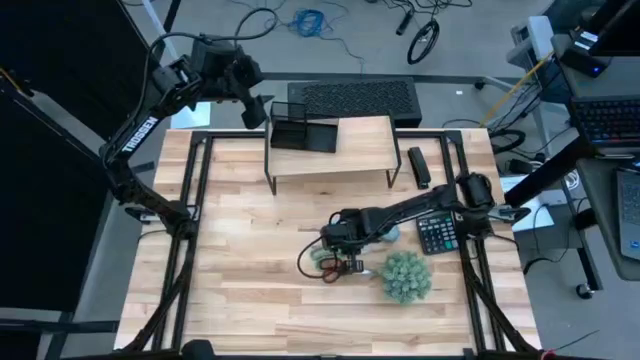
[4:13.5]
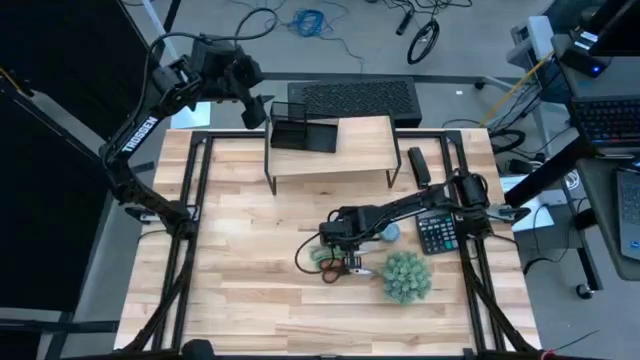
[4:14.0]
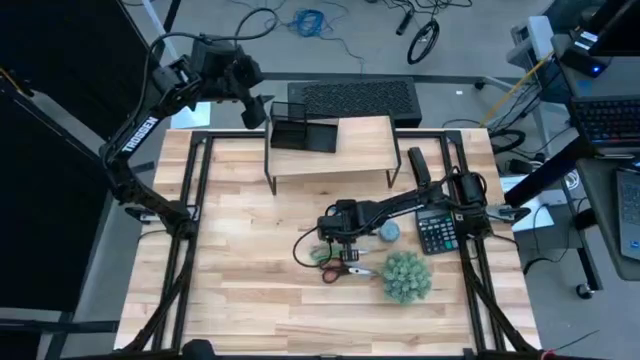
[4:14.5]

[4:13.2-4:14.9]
Task: Pick and place office supplies into organizer
Adjust the pens on the table

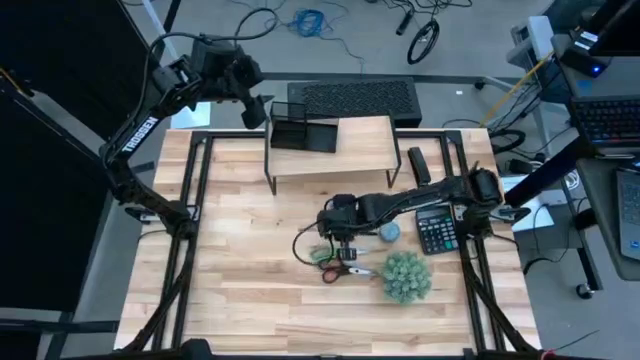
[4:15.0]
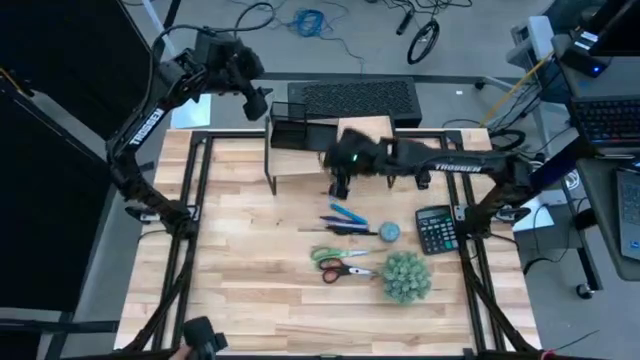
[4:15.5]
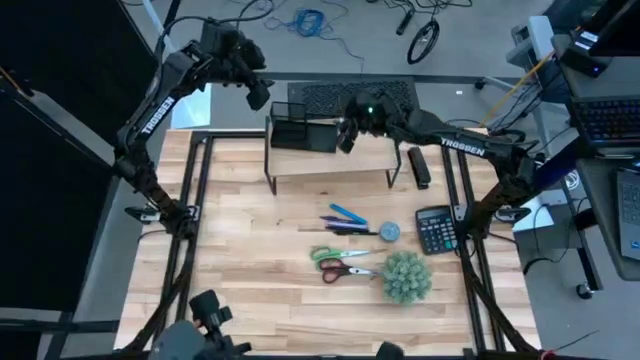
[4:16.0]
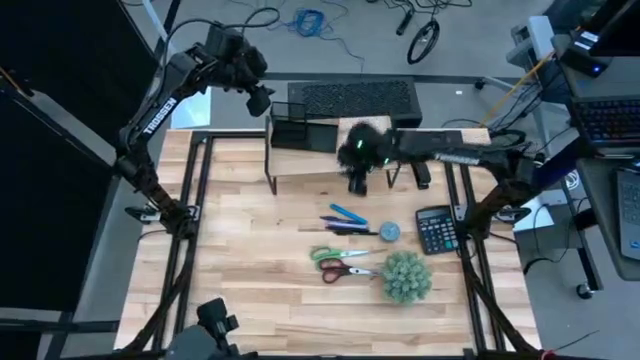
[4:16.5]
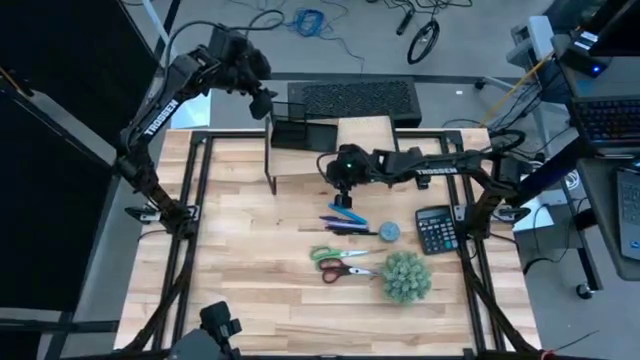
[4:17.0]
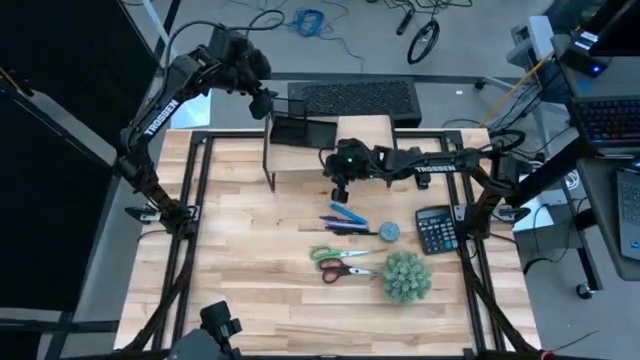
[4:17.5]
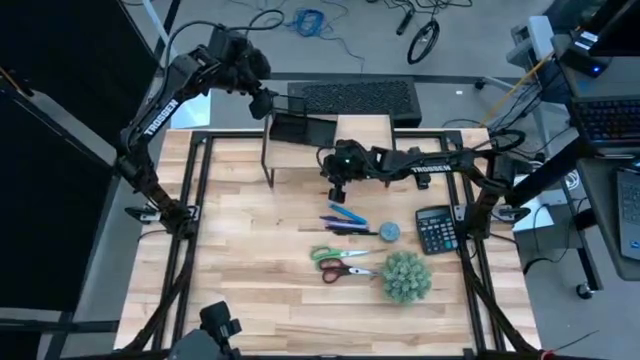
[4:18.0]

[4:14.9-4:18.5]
Adjust the wooden shelf

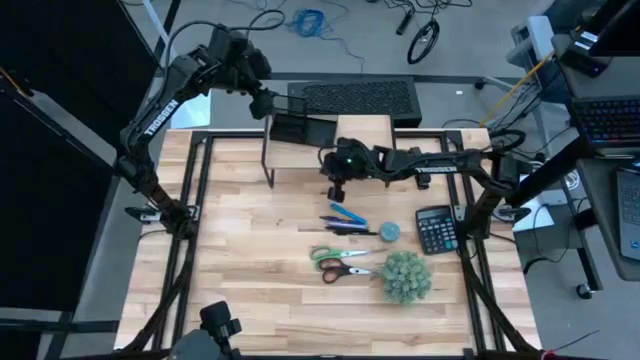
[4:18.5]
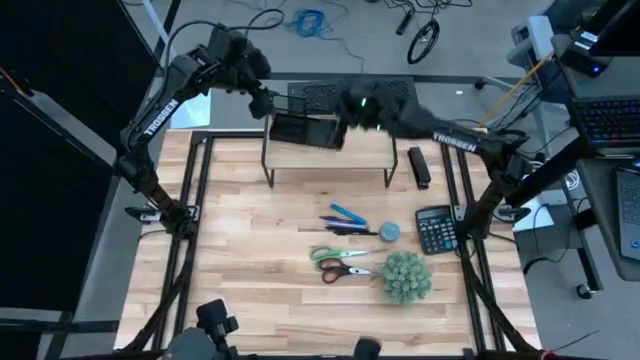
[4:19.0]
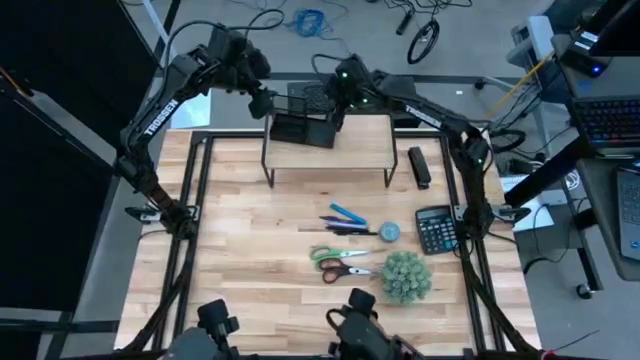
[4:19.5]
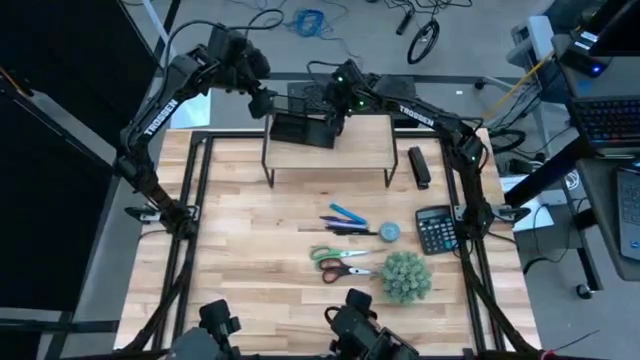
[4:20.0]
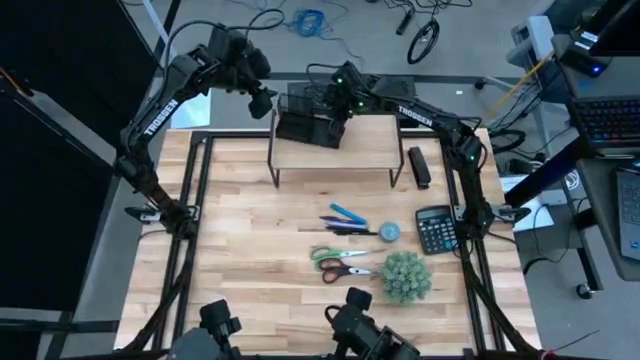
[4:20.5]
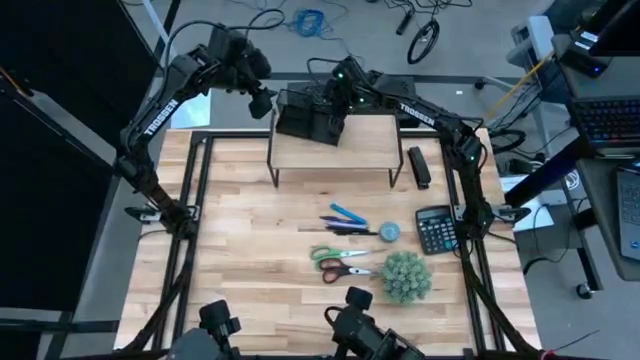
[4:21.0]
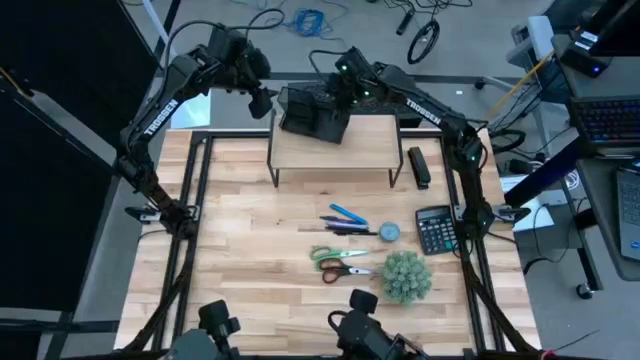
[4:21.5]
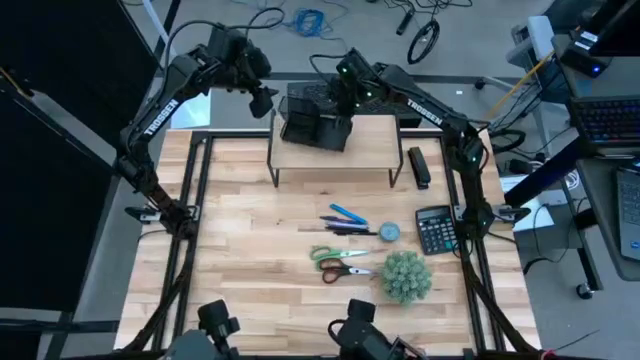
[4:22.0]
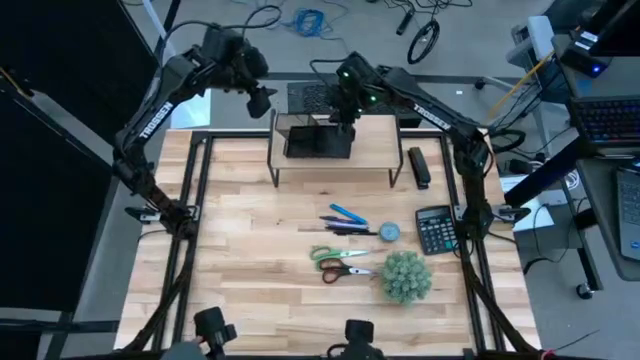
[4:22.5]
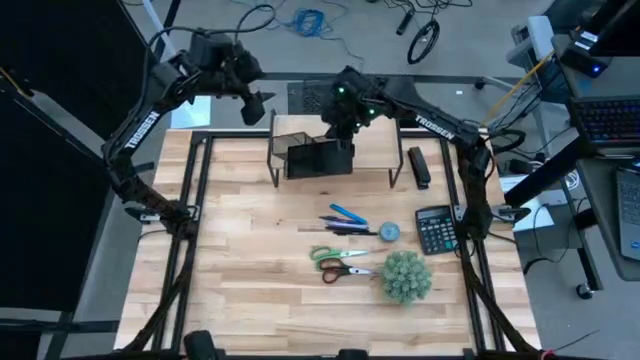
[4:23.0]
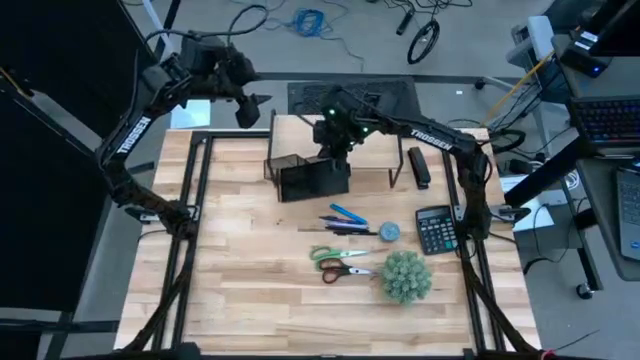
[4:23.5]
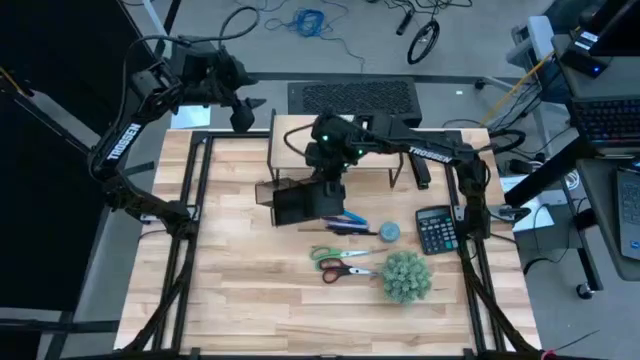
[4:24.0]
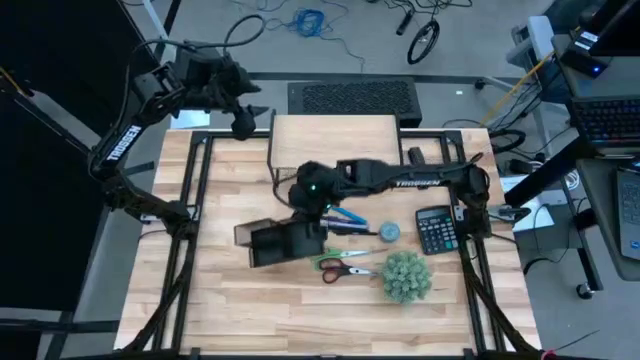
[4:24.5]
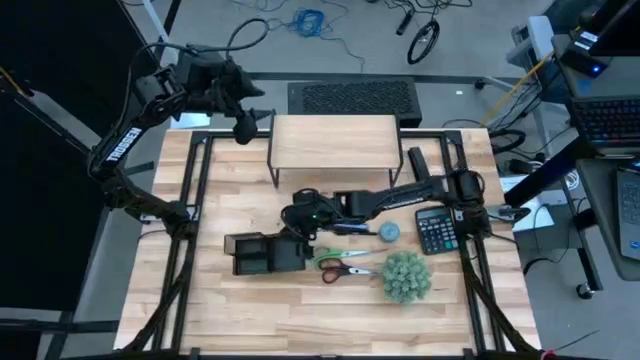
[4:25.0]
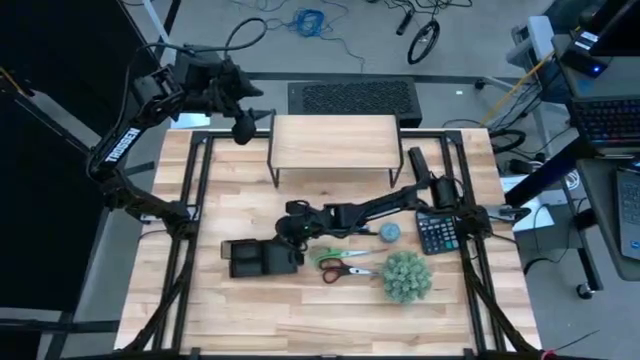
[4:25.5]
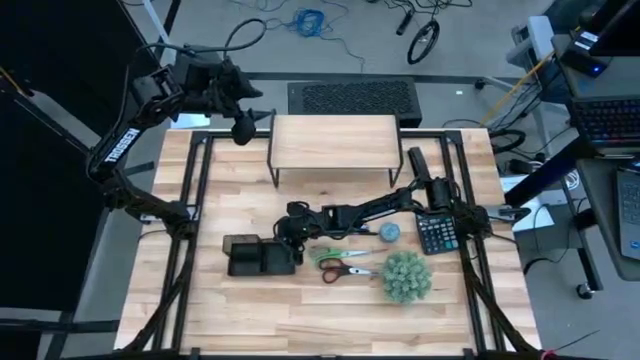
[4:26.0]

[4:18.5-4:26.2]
Remove the desk organizer from the shelf

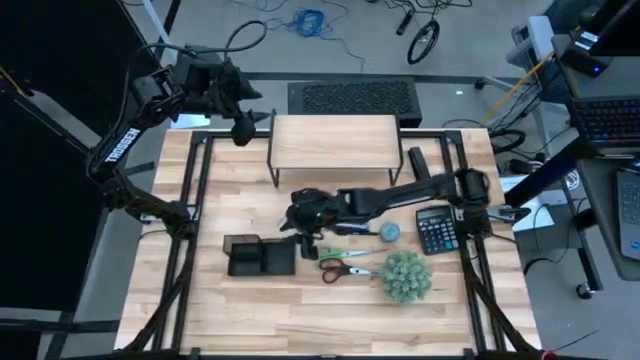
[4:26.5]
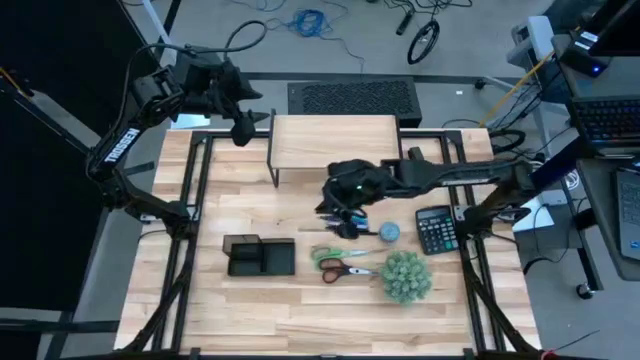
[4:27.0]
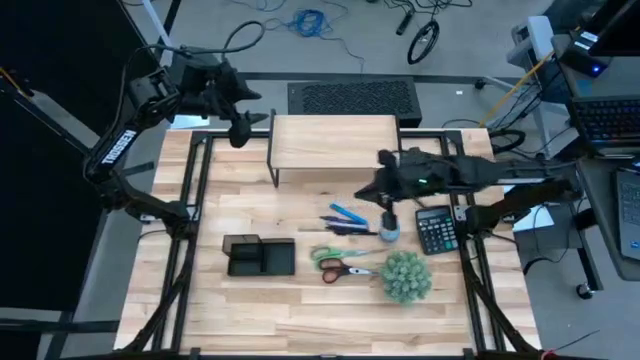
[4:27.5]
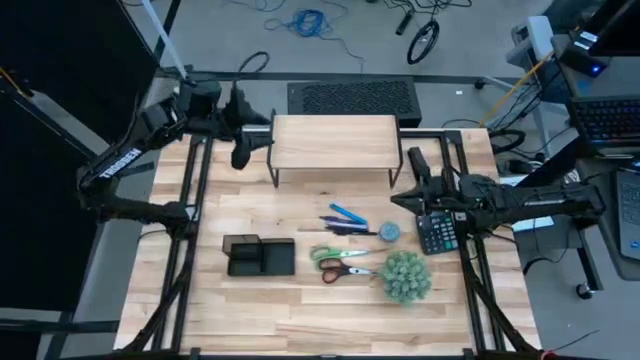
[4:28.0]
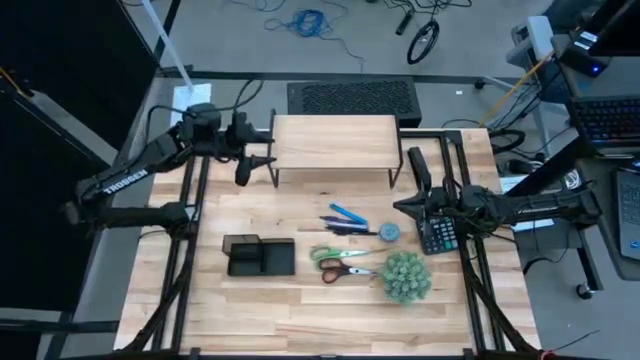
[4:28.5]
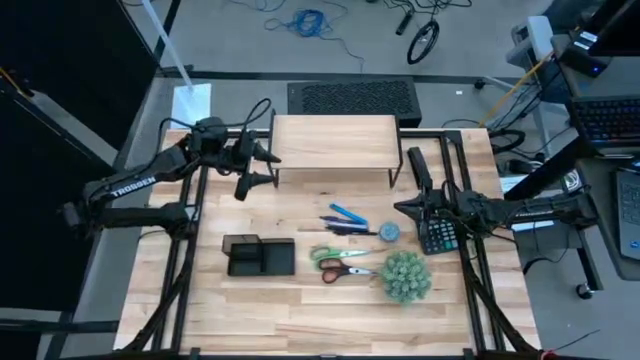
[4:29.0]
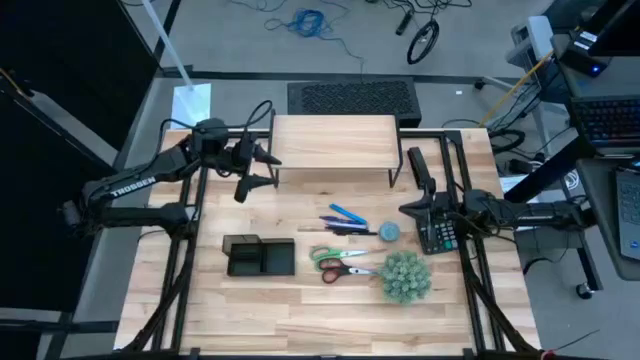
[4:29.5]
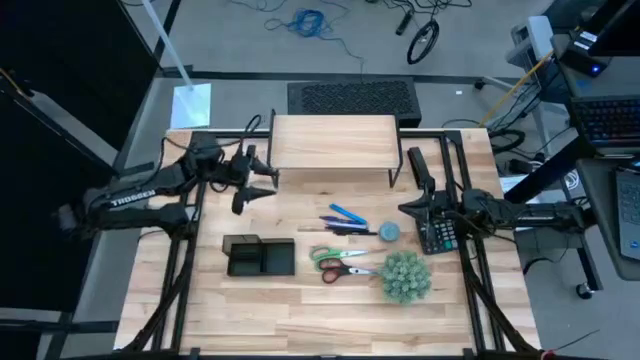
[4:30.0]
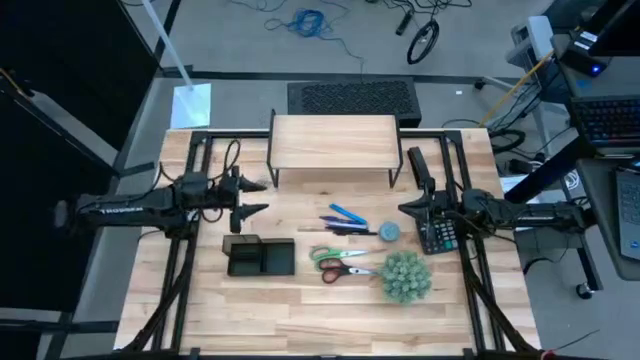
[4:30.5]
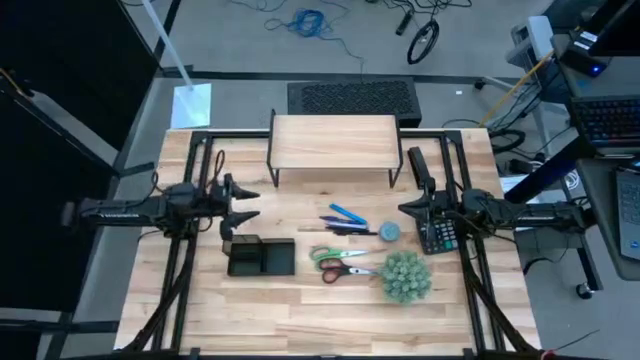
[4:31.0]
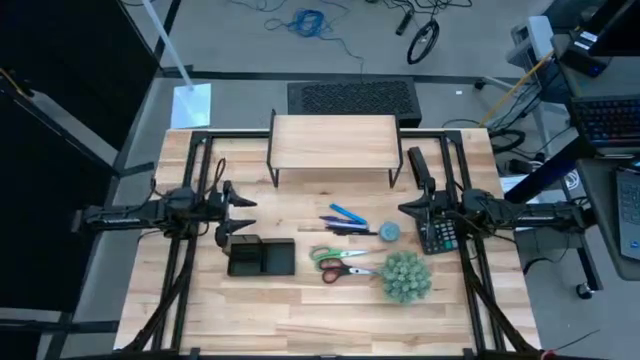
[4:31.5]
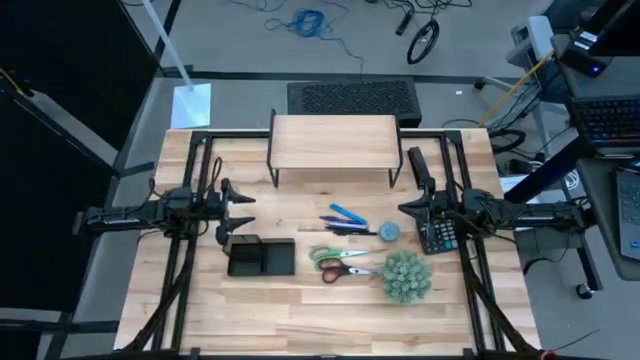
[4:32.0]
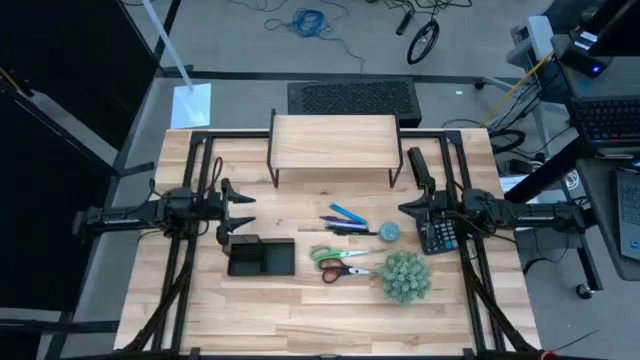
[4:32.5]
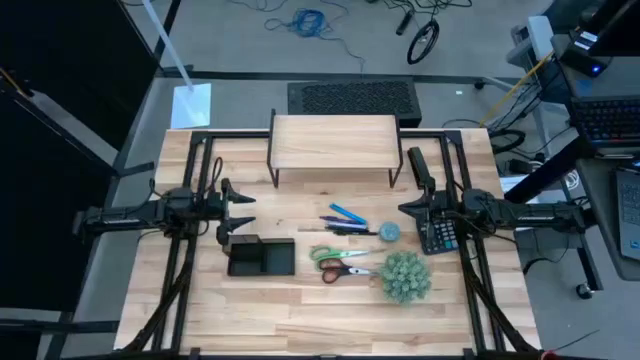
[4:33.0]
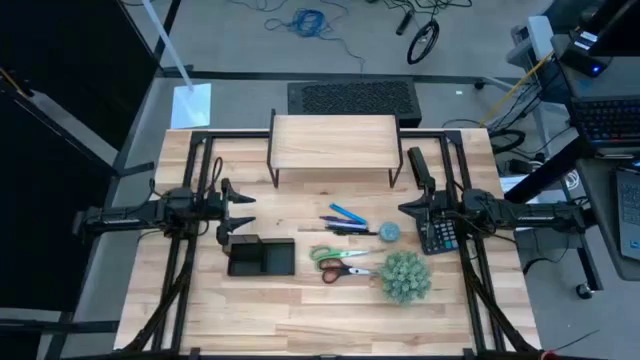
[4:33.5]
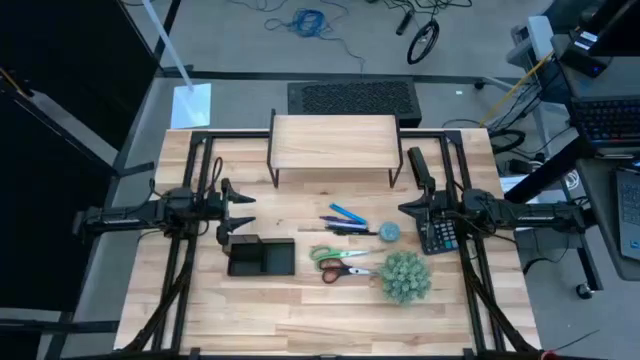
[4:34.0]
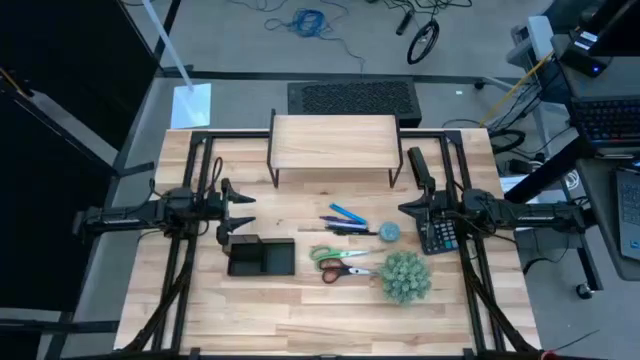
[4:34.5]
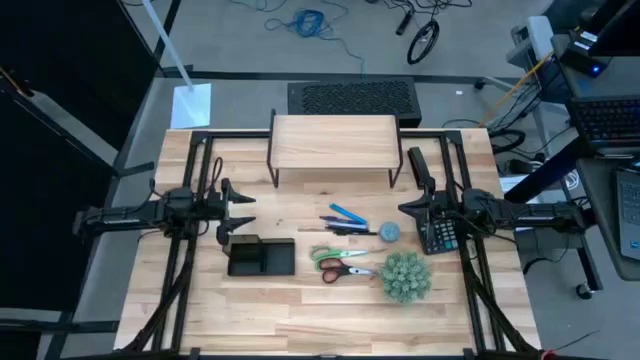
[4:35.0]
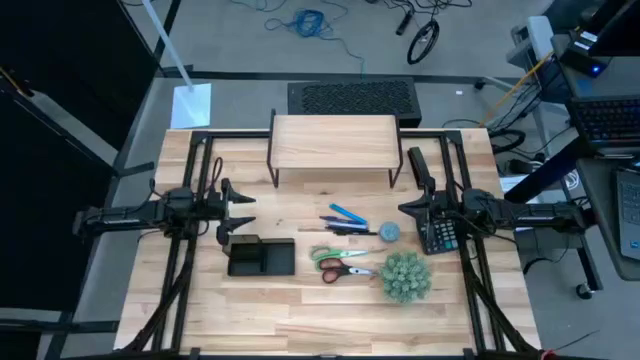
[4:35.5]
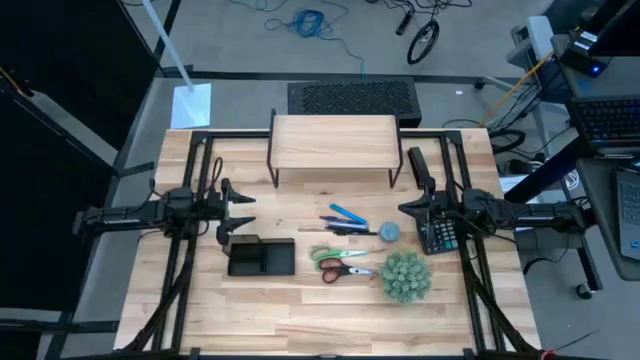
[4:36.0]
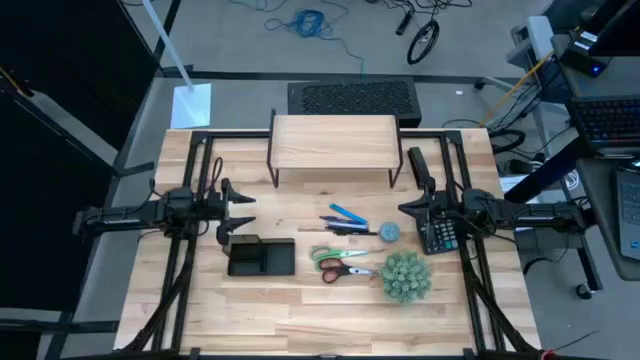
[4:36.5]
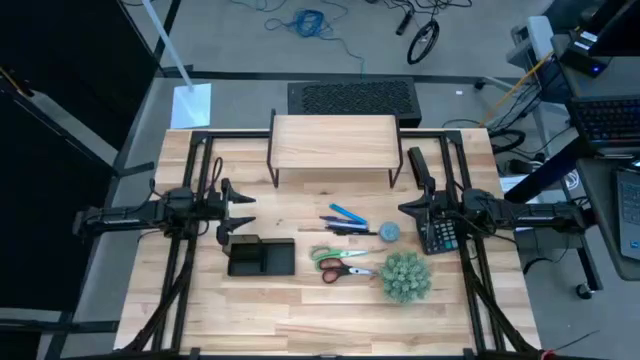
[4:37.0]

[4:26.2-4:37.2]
Return to Home Position
